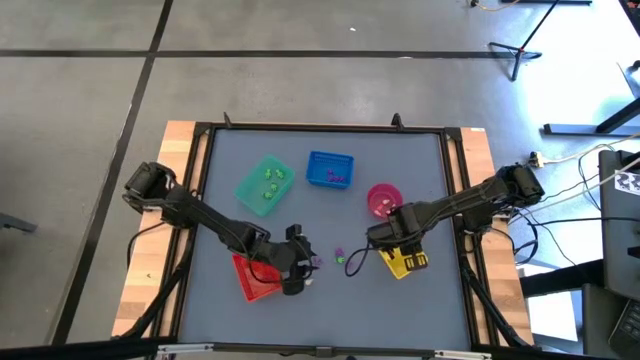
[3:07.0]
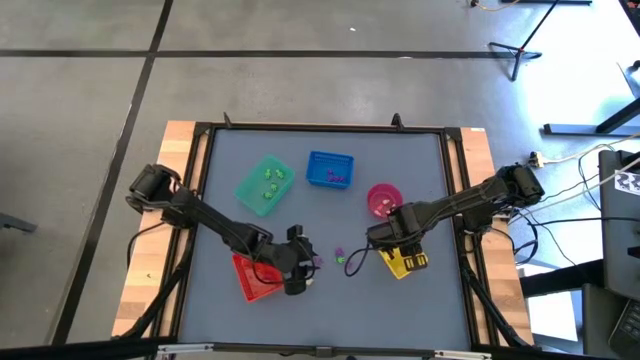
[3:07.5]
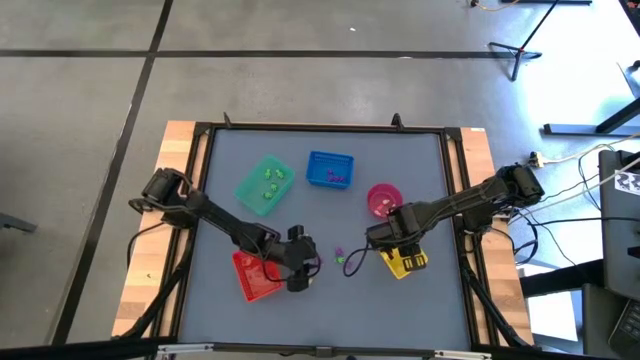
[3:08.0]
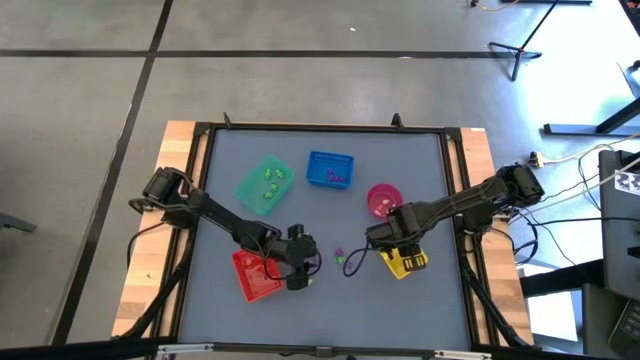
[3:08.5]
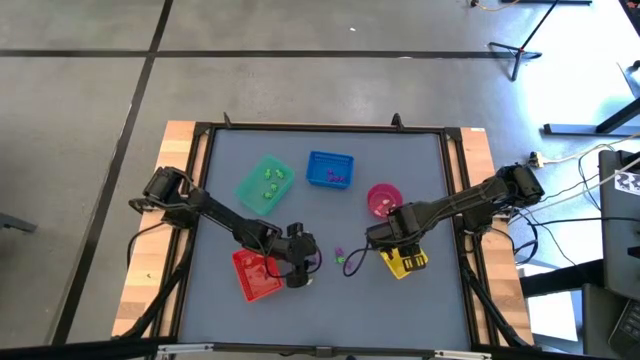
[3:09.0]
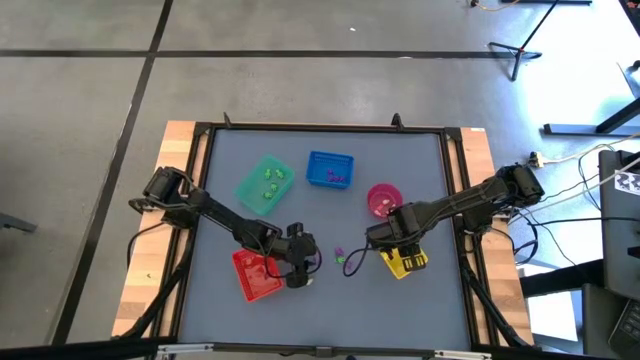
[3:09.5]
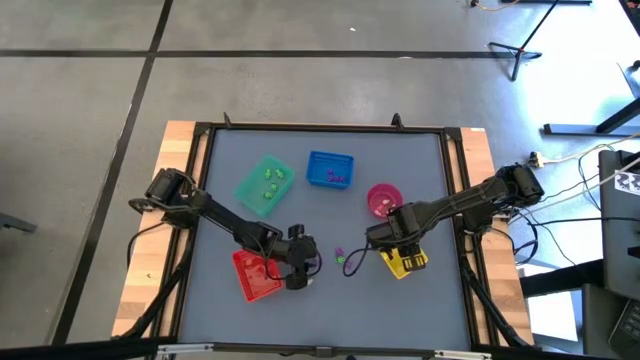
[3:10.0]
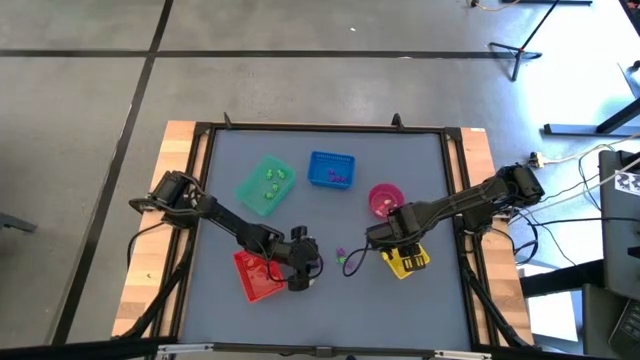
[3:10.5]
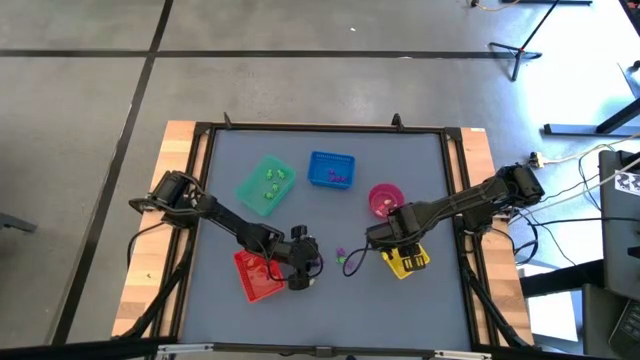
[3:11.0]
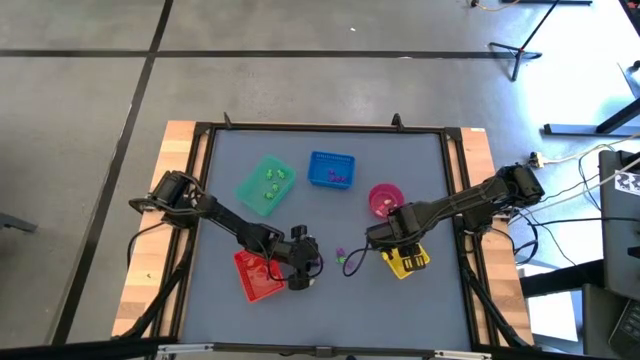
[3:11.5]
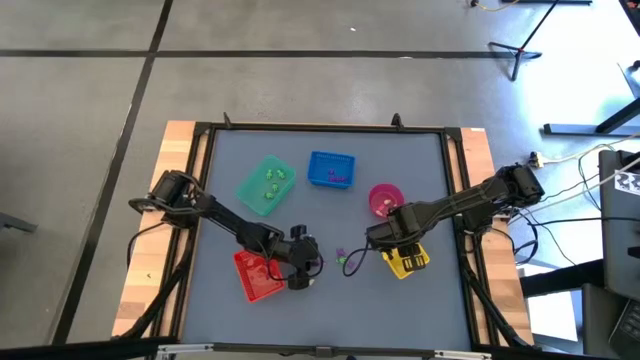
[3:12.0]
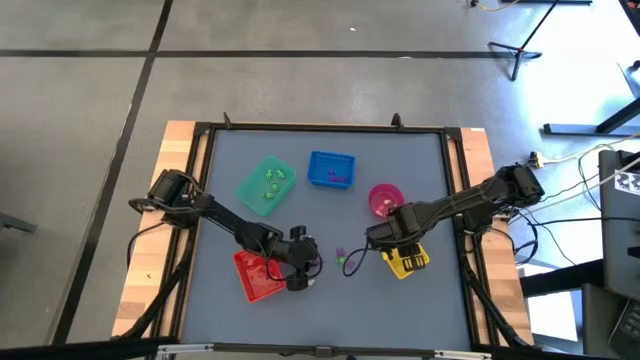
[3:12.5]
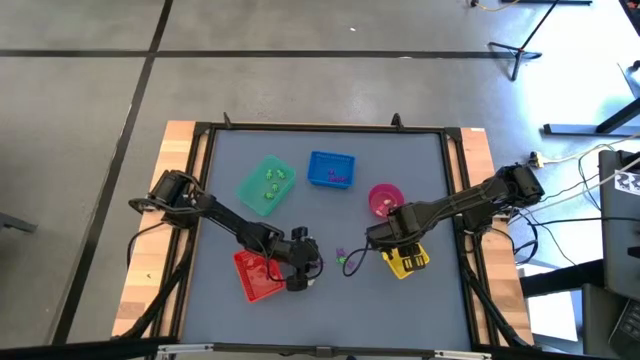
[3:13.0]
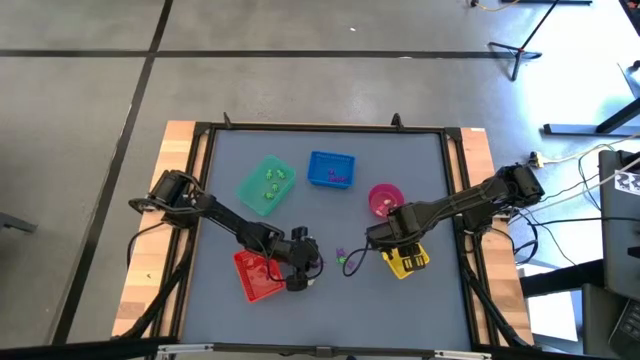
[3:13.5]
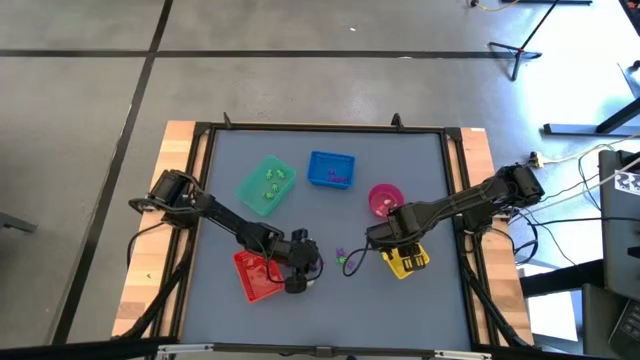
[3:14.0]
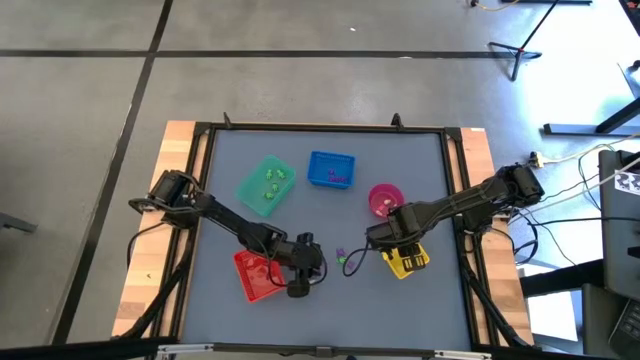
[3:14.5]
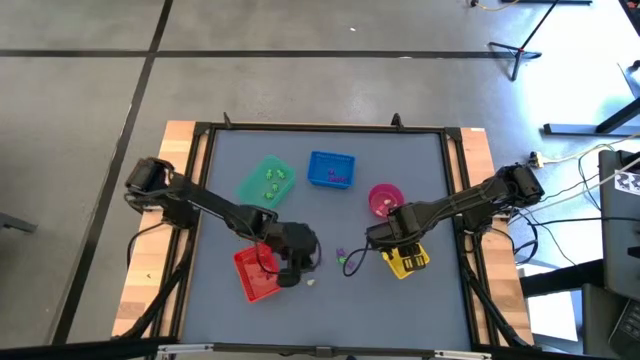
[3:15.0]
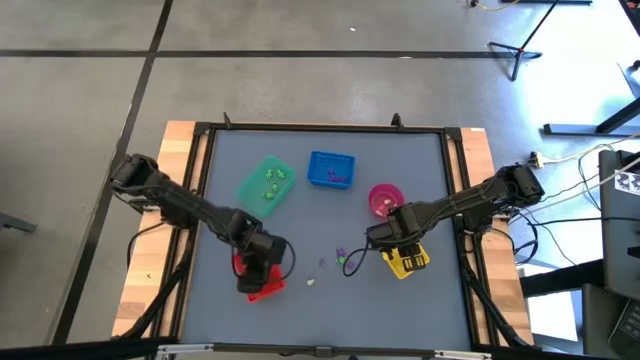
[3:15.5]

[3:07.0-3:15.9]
Task: Sort Halloween decoration
Put the purple witch hat toy into the orange bin

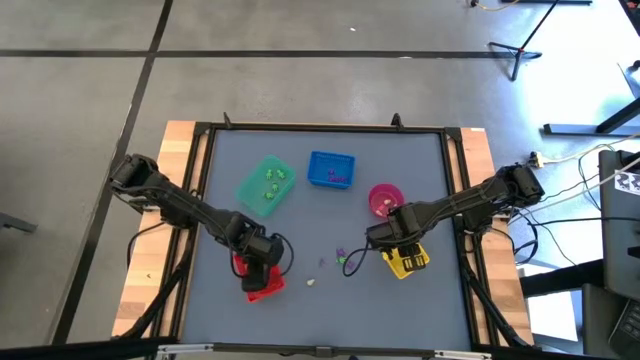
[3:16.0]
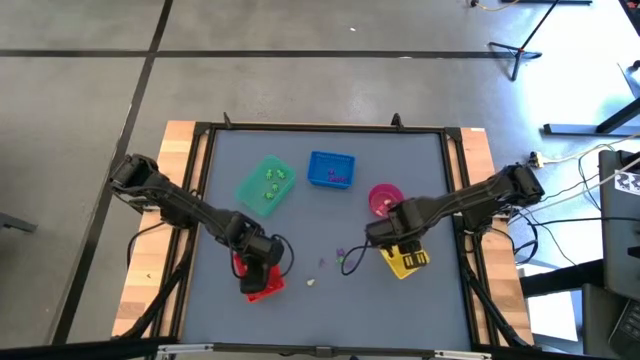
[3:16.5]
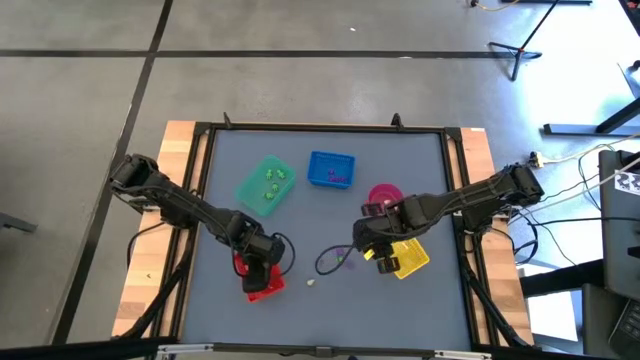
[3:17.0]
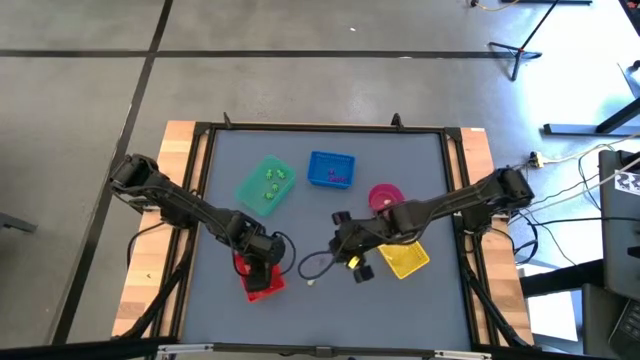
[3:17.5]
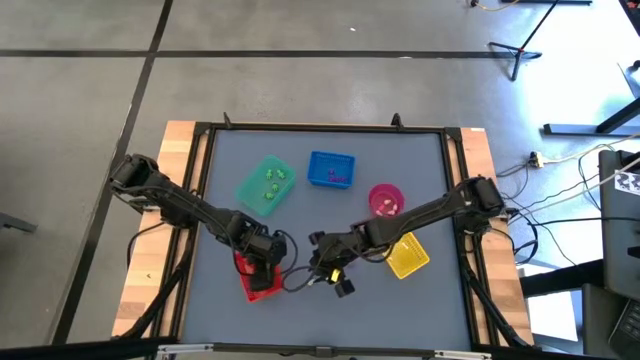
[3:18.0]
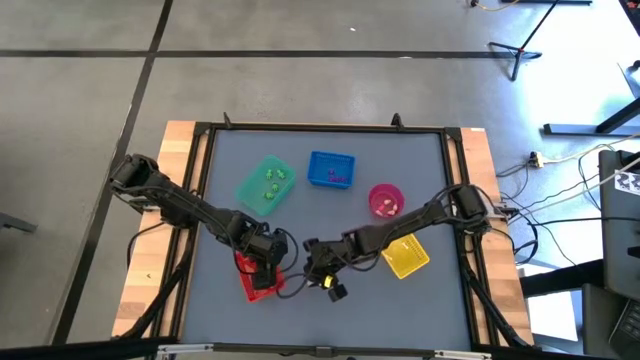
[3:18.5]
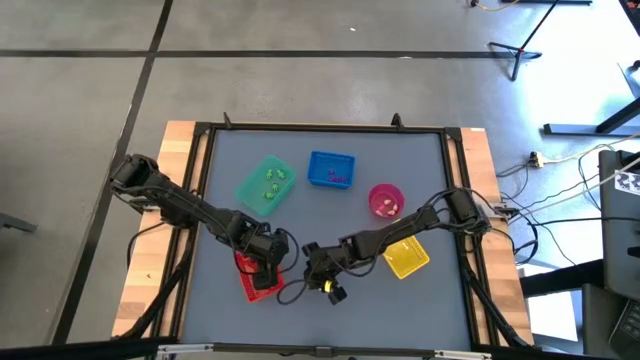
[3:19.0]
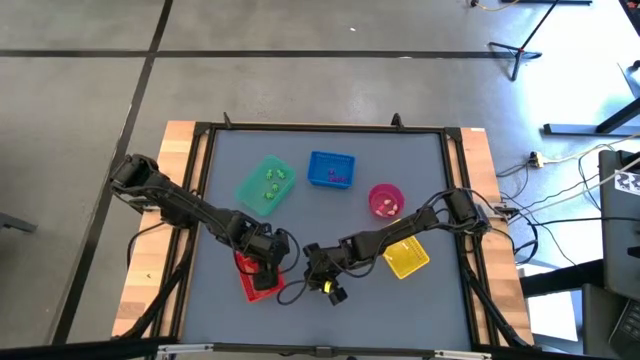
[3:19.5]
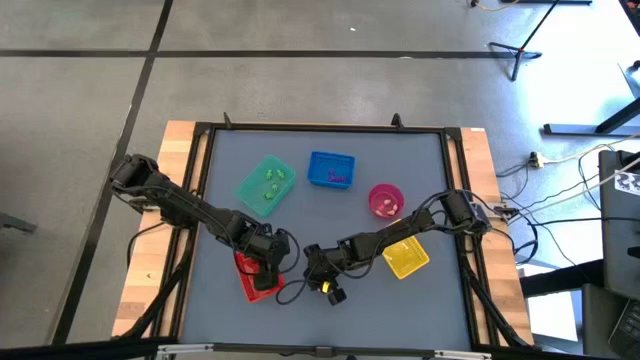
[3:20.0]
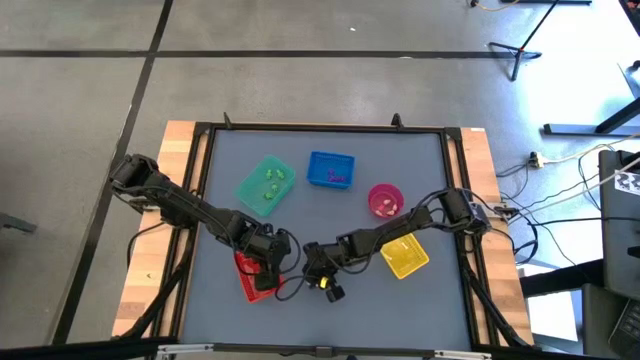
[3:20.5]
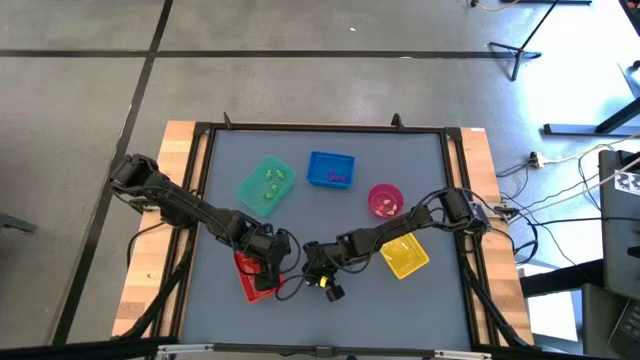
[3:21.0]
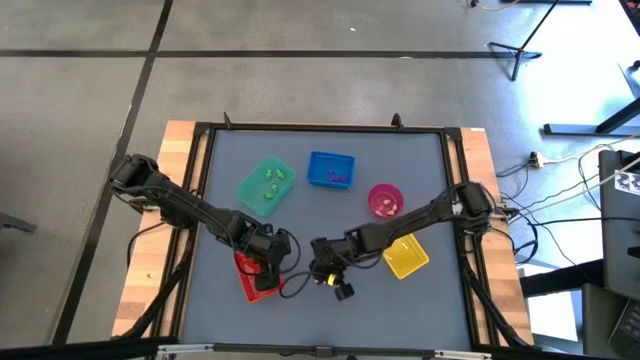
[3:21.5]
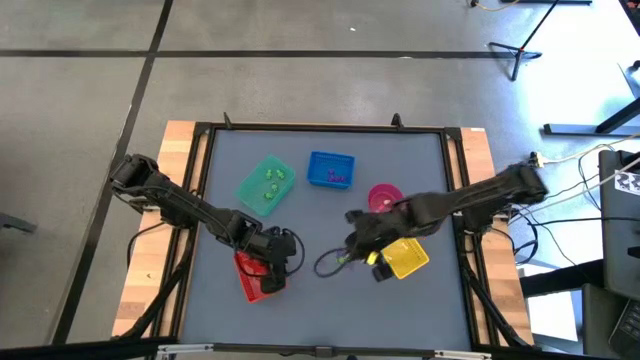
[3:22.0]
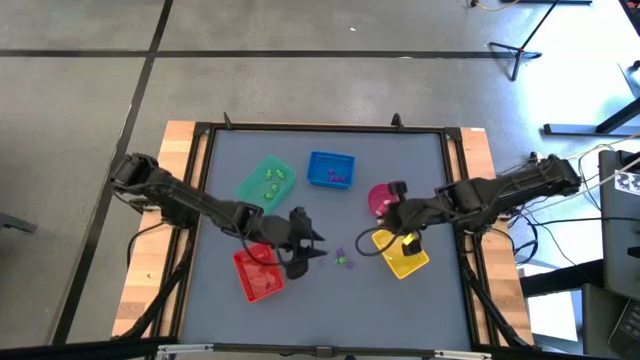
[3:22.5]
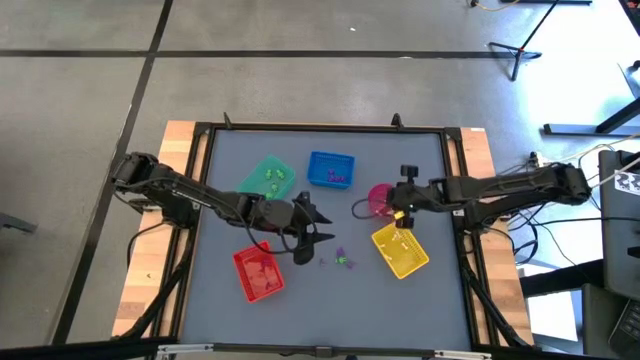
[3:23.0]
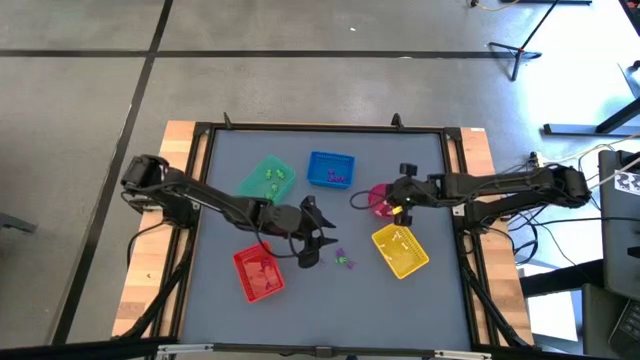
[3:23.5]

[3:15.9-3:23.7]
Put the yellow skull toy into the red bin

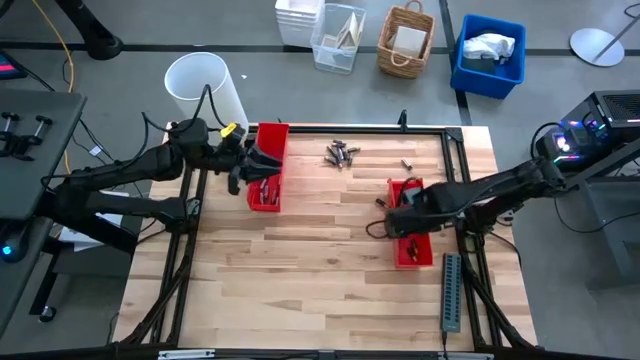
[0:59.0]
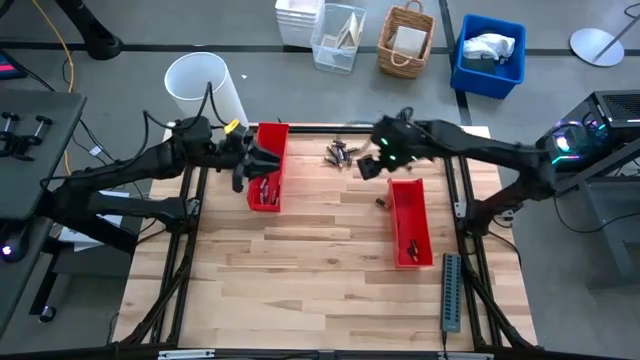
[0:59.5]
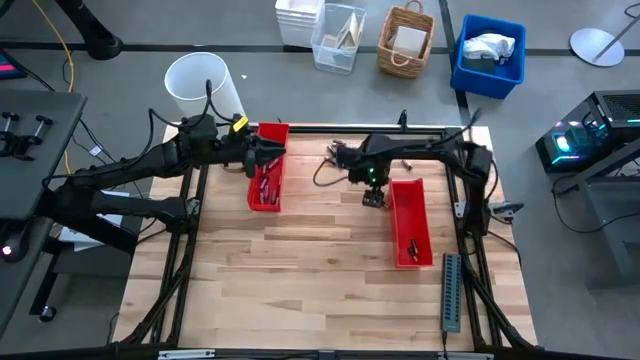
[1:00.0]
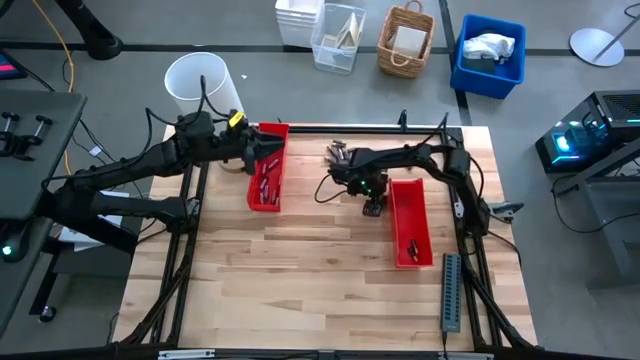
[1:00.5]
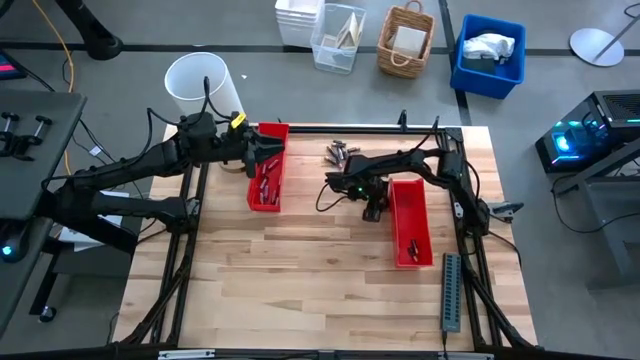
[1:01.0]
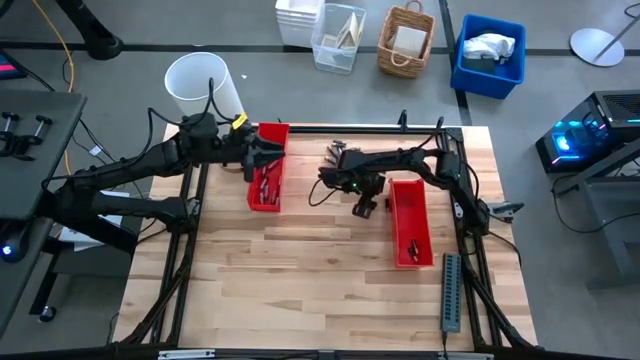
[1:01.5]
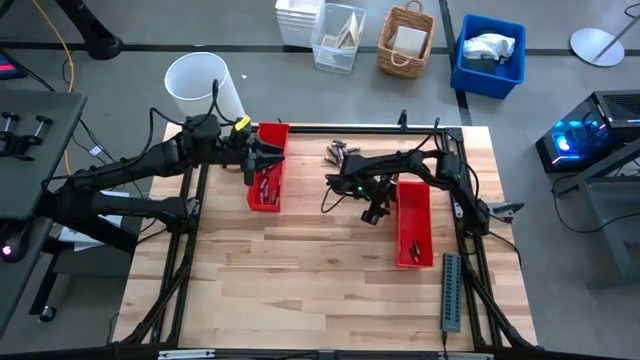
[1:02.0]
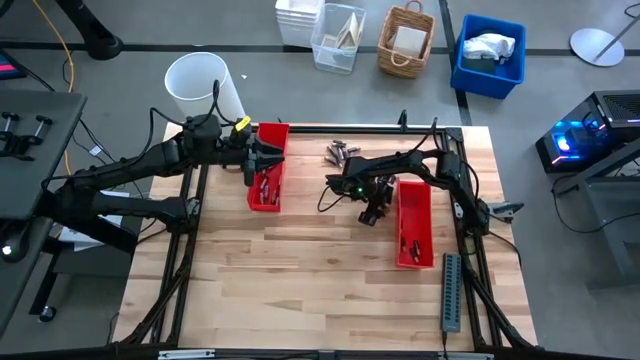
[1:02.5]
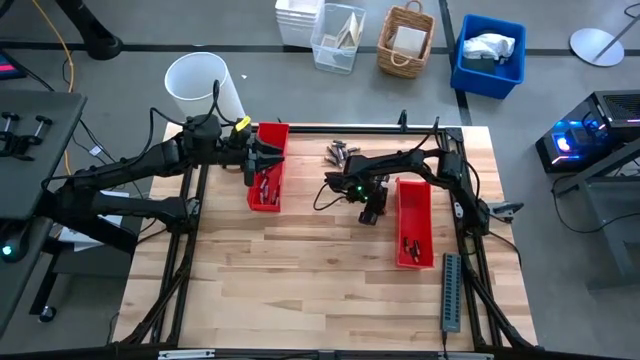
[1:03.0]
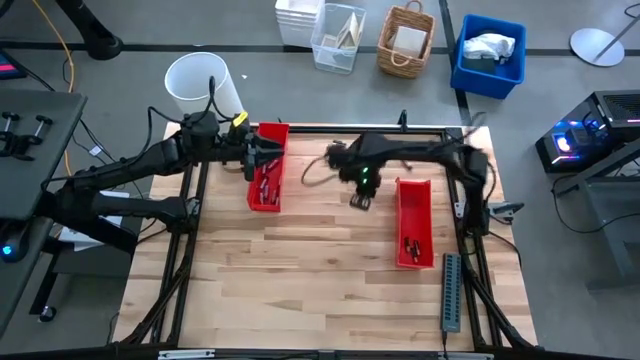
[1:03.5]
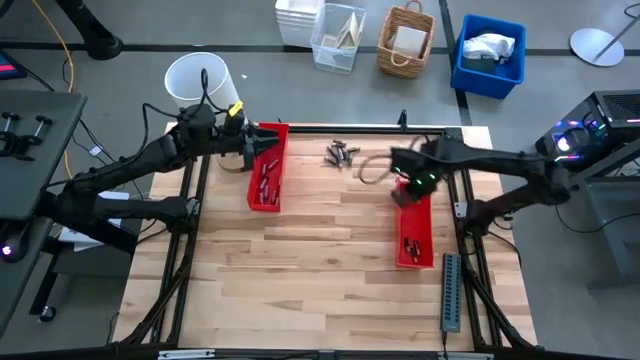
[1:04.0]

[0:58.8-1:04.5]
Task: Sort batteries
Put the black battery into the bottom red bin
